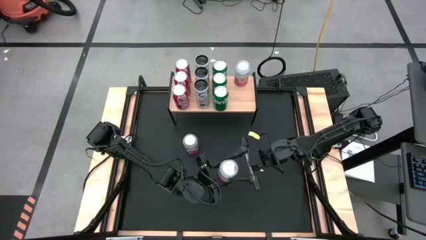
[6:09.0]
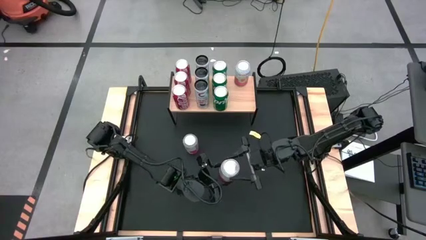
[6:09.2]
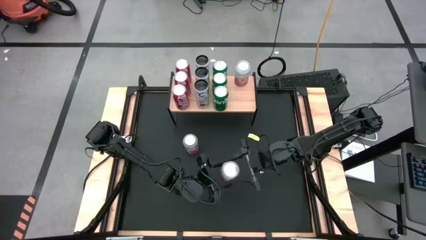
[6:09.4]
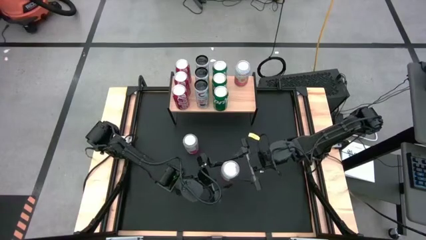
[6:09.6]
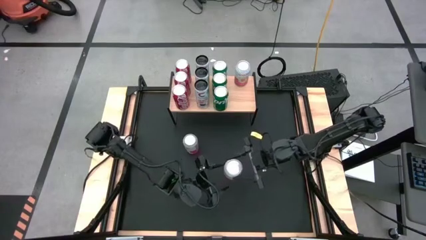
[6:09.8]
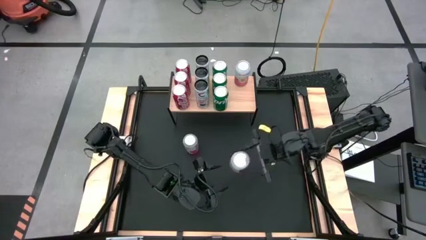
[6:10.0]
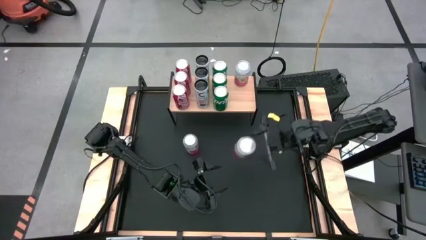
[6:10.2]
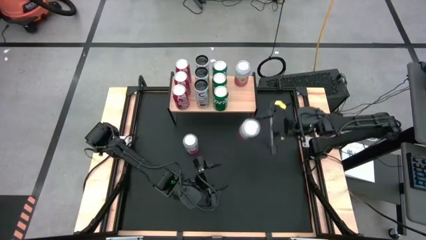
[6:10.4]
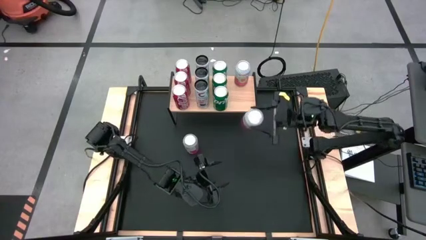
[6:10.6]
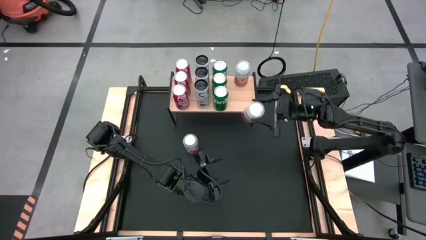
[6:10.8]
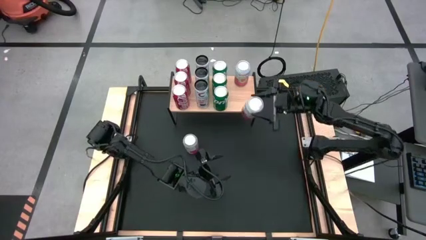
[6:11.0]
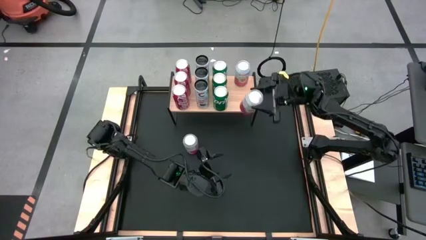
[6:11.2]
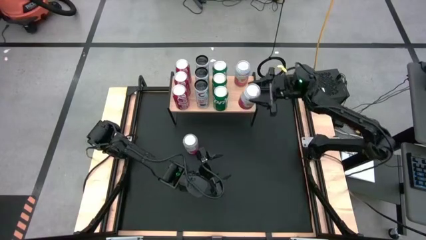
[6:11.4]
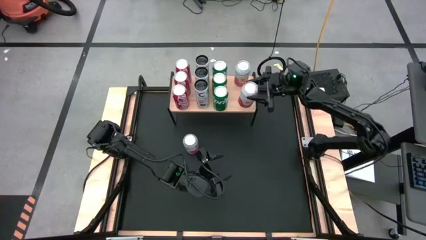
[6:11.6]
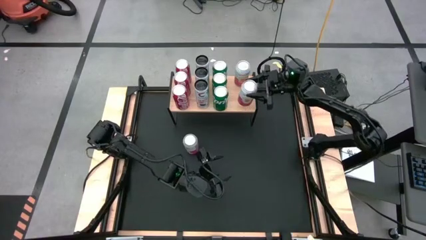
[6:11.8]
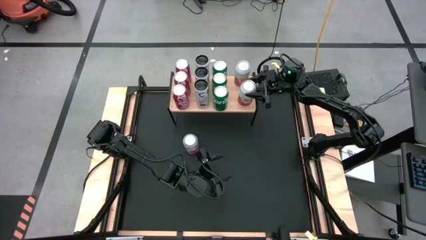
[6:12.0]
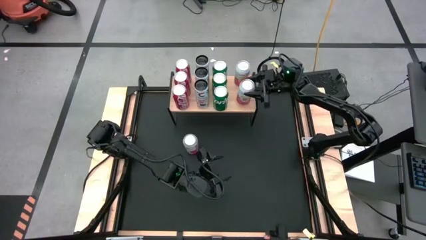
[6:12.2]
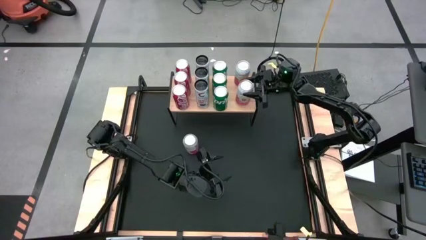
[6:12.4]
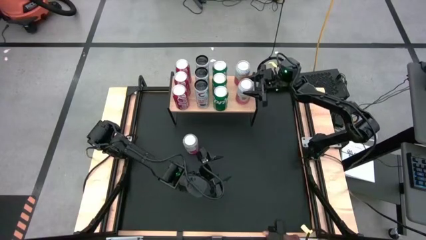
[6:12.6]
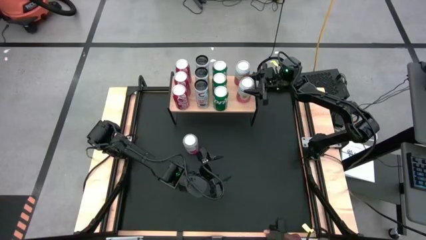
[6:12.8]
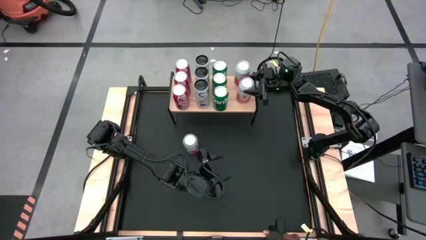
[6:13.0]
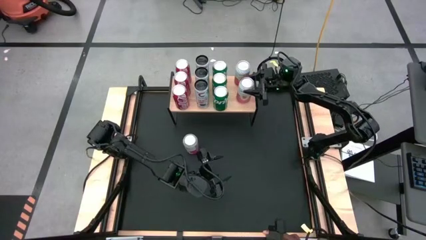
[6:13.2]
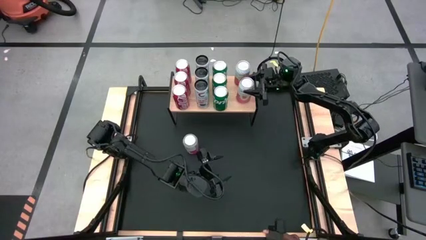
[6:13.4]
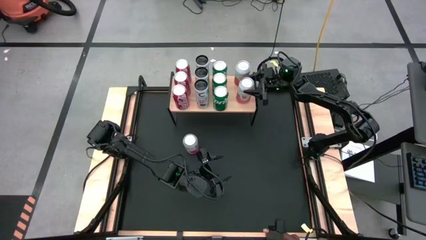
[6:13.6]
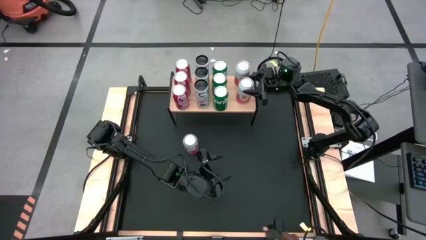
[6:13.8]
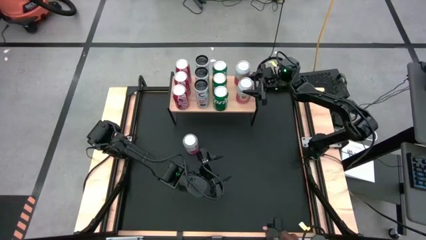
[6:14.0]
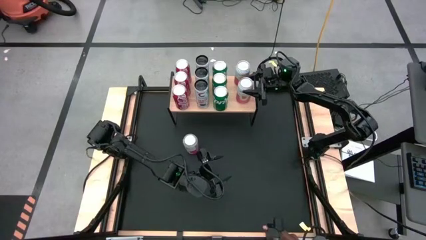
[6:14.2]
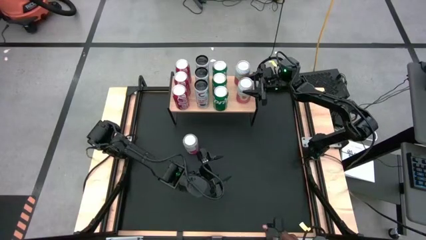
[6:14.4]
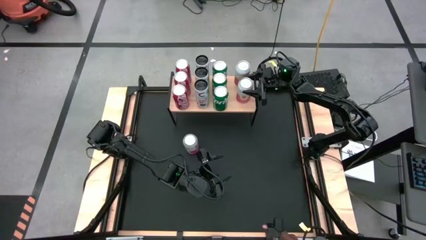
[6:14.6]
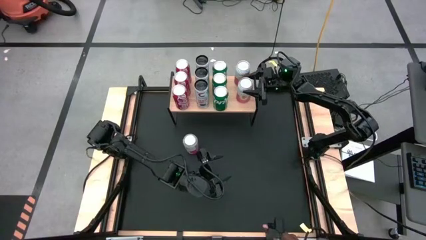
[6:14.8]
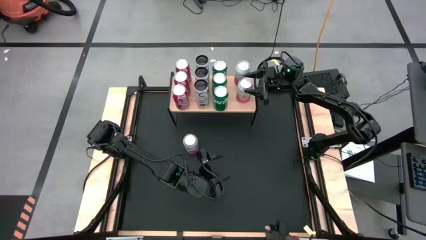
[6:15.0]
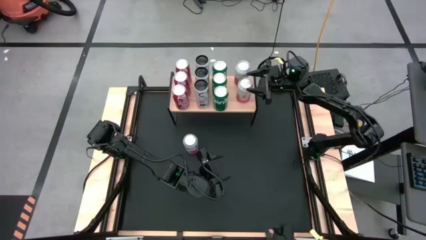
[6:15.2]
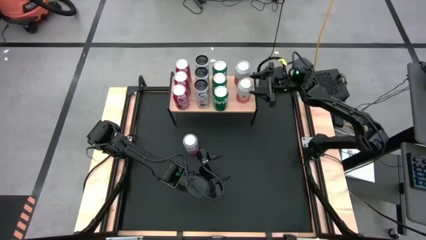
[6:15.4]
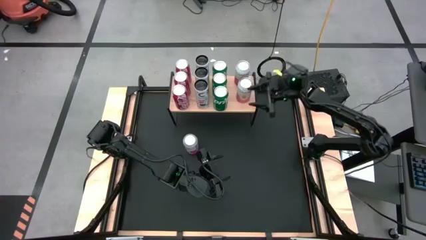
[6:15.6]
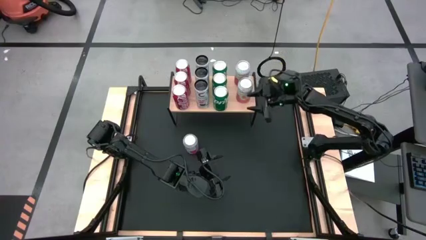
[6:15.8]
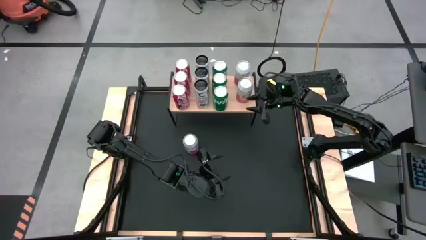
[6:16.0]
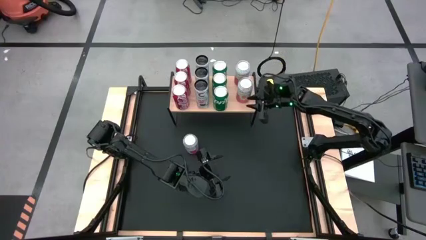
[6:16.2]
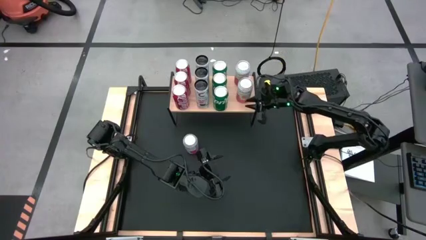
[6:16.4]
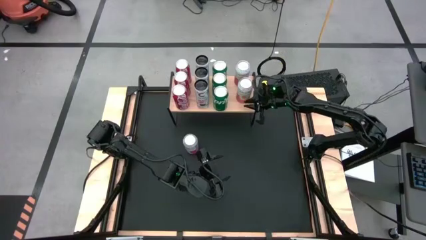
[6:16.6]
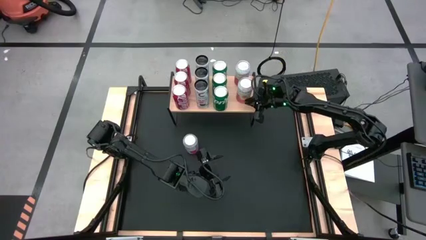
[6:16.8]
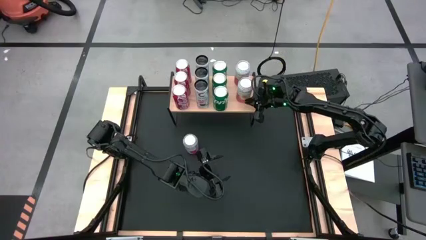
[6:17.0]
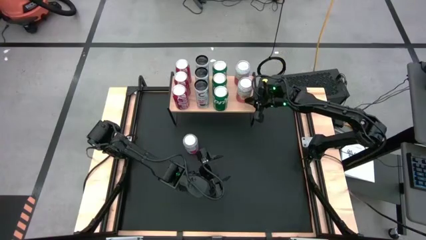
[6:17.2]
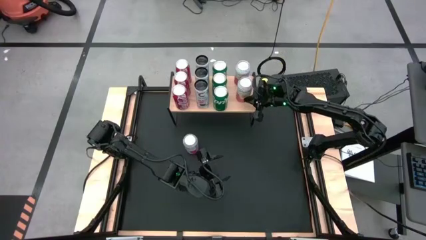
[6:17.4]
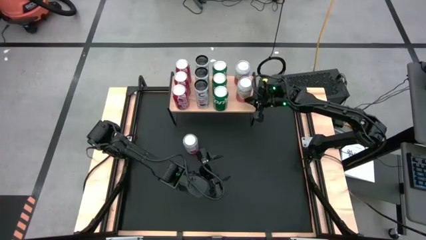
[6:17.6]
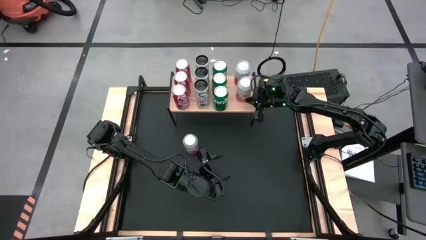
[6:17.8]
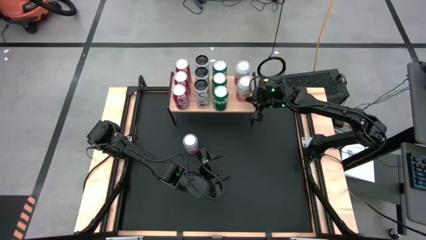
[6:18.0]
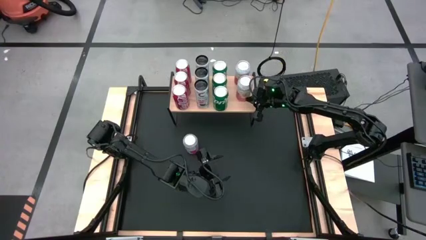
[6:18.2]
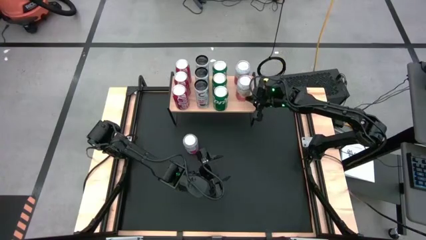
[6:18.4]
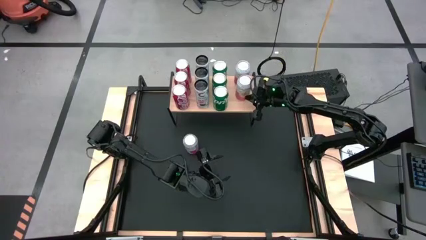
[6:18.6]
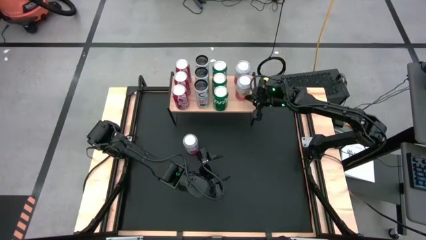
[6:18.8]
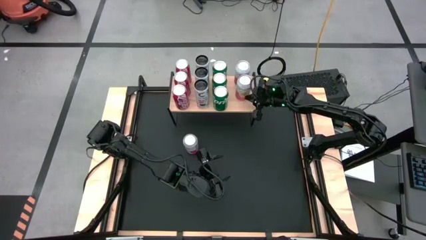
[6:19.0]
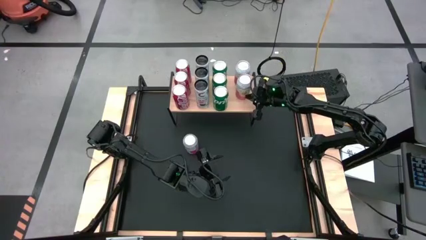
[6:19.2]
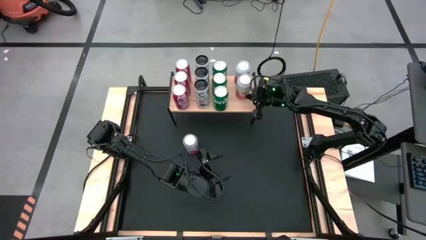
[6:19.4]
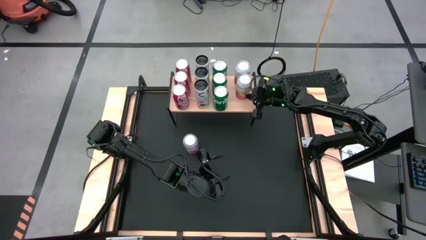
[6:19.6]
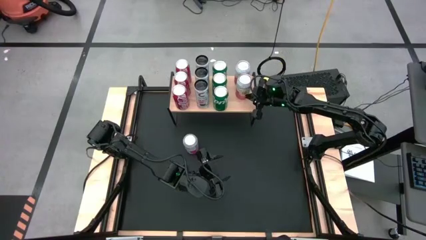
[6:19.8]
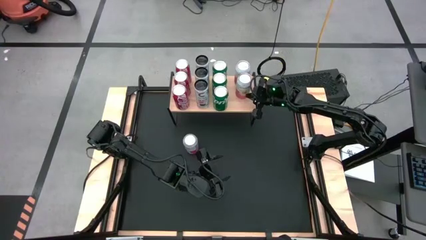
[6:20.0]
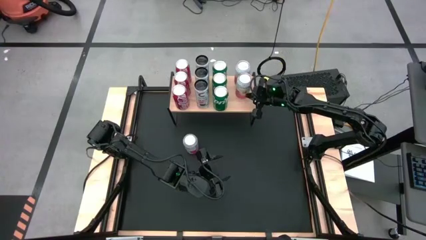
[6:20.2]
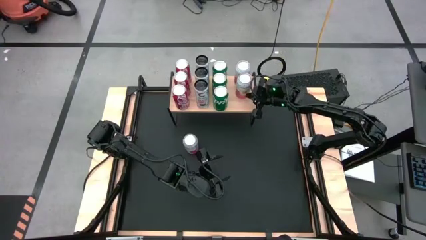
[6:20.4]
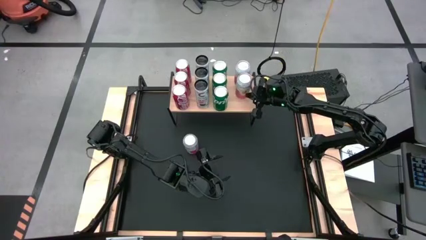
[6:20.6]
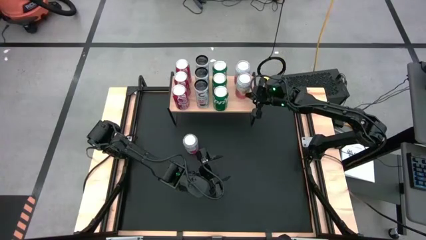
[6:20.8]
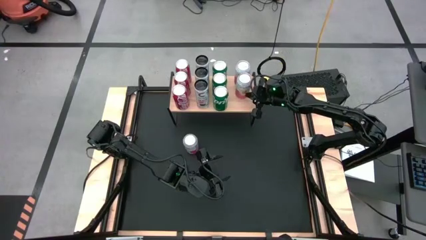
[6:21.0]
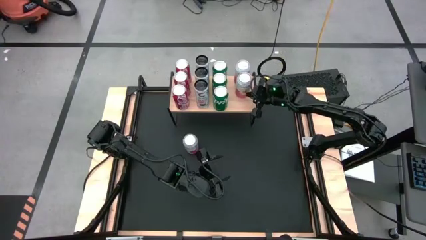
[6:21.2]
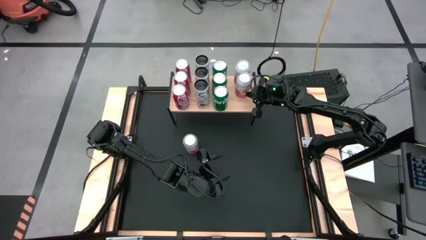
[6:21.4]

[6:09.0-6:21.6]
Task: Place canned beverage on shelf
Put the bottom pink soda can aligned with the other pink soda can on the shelf
